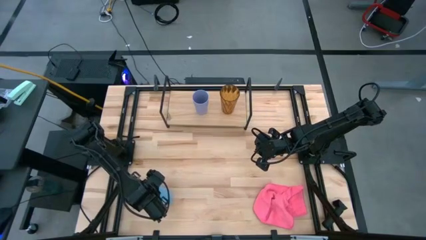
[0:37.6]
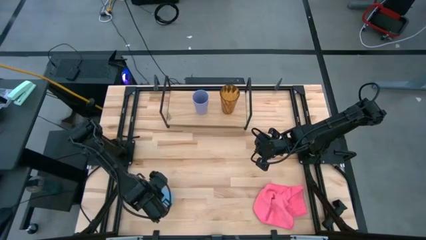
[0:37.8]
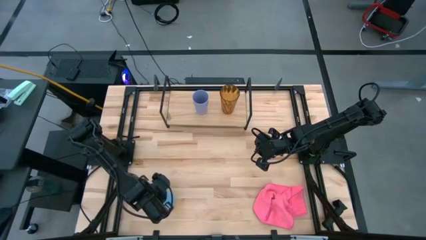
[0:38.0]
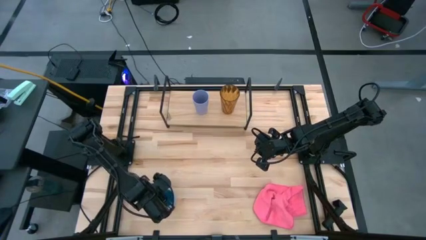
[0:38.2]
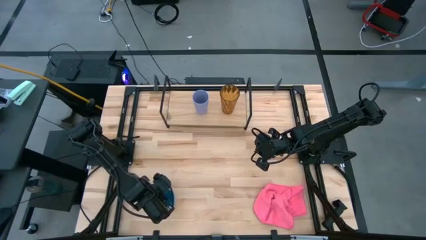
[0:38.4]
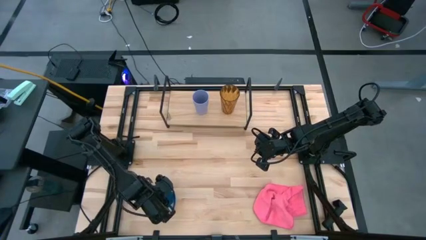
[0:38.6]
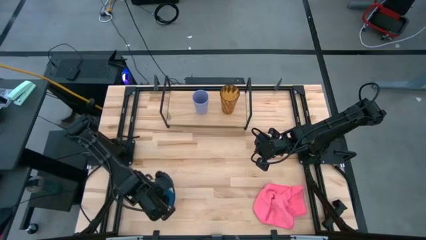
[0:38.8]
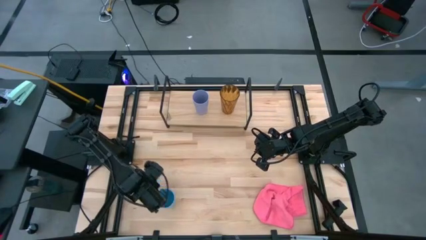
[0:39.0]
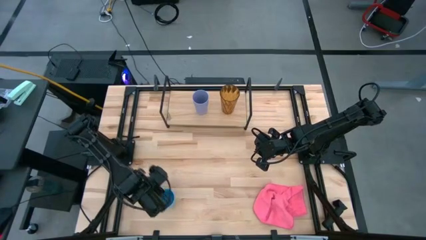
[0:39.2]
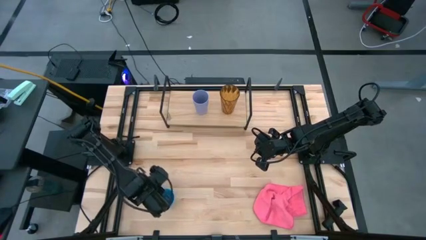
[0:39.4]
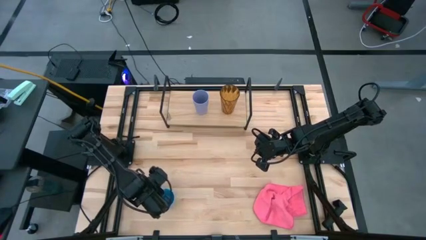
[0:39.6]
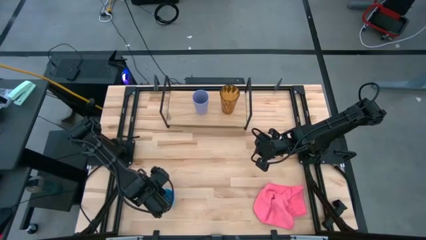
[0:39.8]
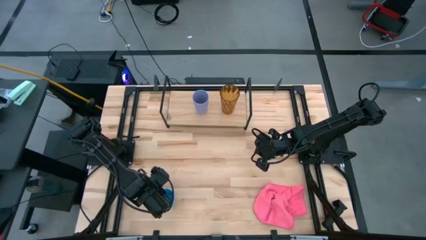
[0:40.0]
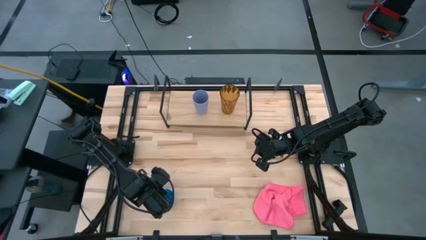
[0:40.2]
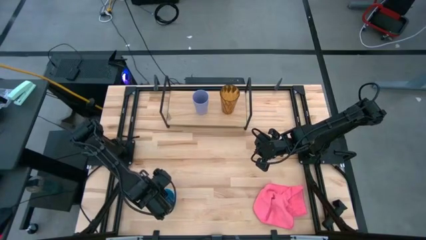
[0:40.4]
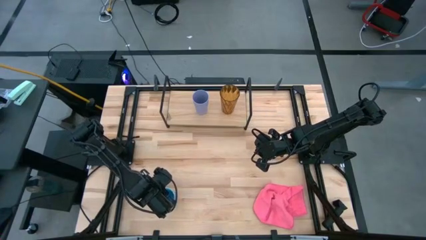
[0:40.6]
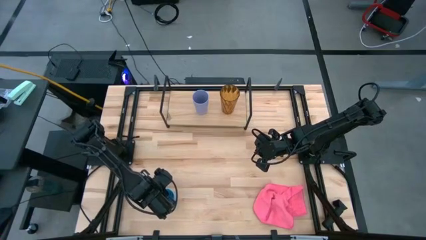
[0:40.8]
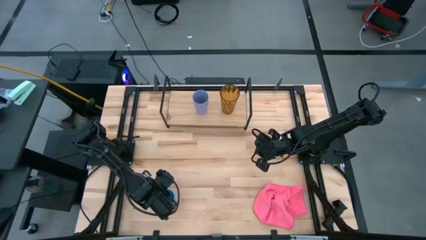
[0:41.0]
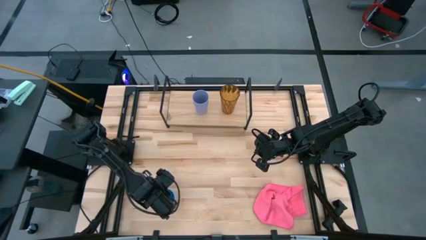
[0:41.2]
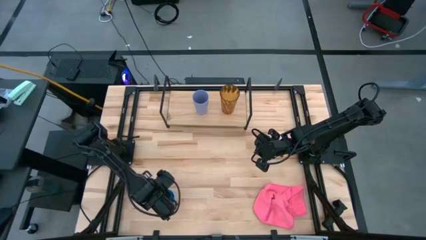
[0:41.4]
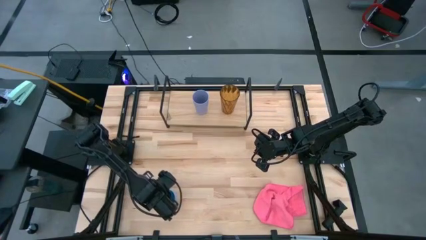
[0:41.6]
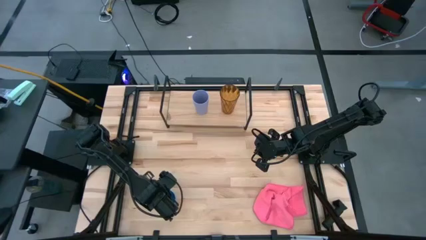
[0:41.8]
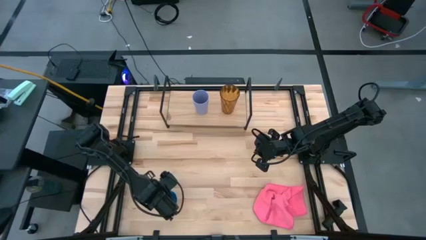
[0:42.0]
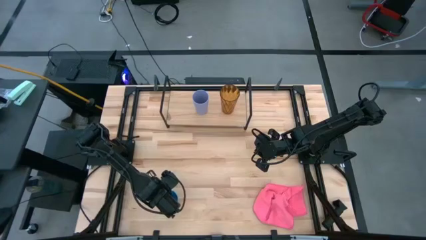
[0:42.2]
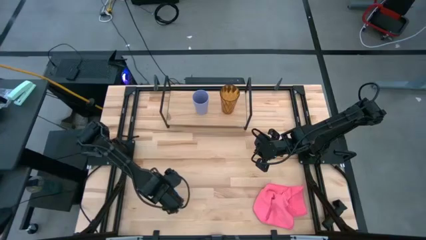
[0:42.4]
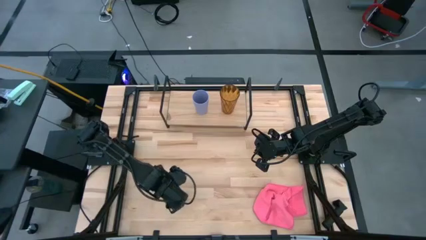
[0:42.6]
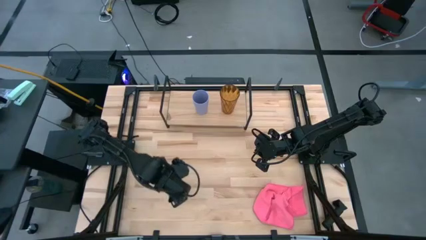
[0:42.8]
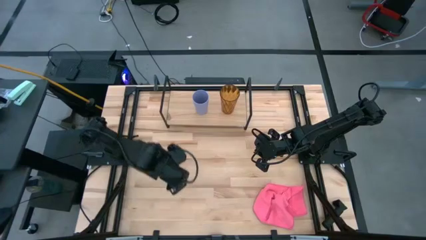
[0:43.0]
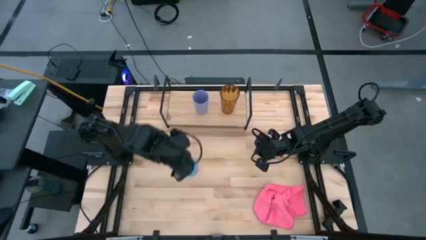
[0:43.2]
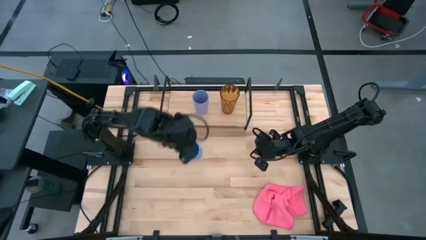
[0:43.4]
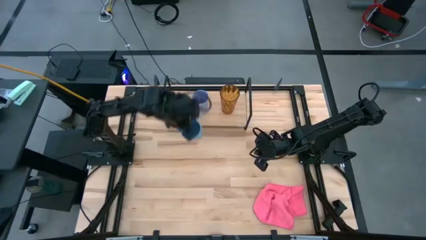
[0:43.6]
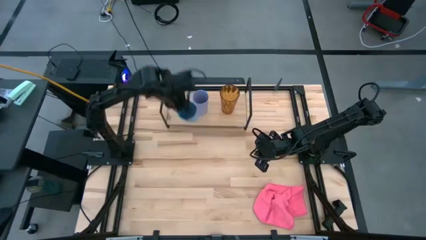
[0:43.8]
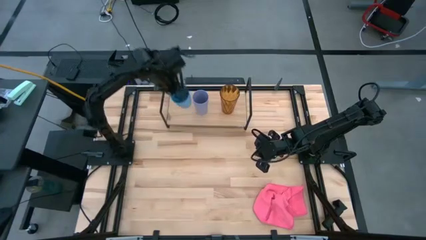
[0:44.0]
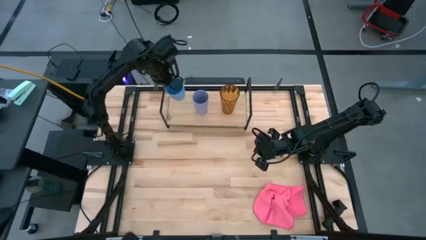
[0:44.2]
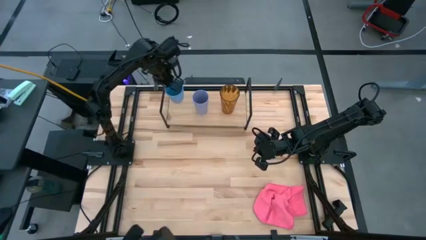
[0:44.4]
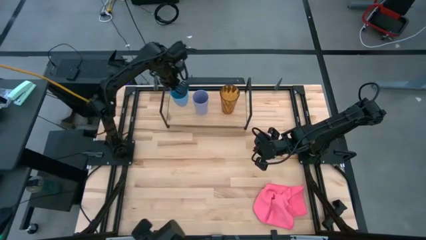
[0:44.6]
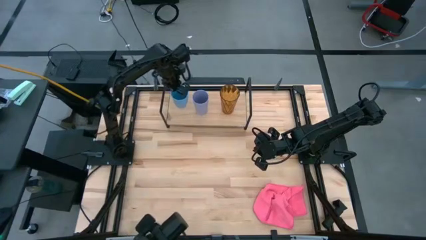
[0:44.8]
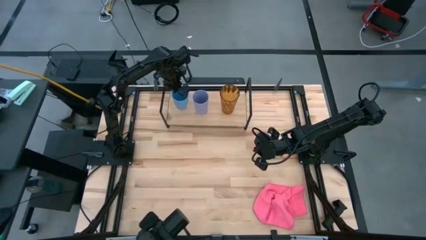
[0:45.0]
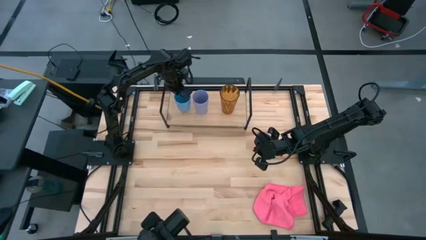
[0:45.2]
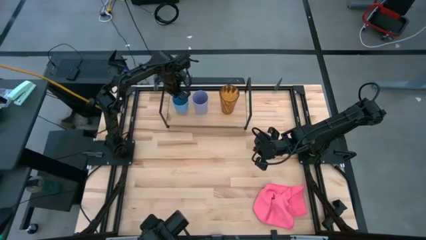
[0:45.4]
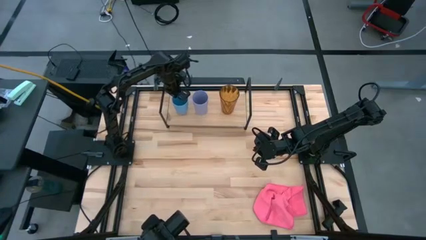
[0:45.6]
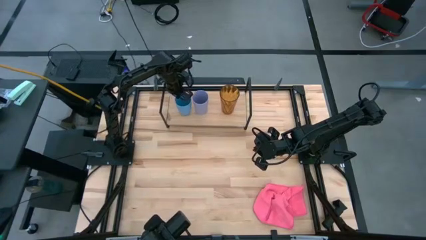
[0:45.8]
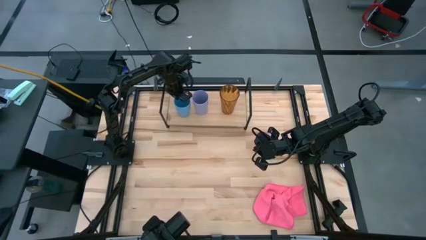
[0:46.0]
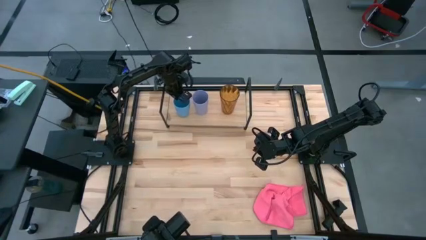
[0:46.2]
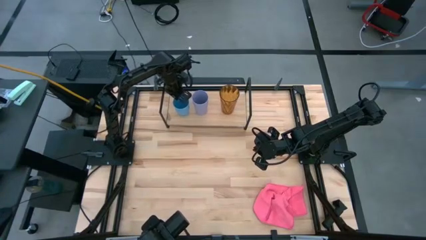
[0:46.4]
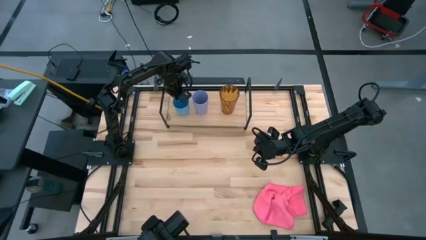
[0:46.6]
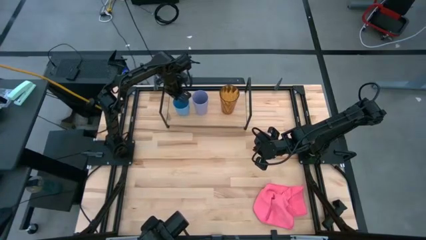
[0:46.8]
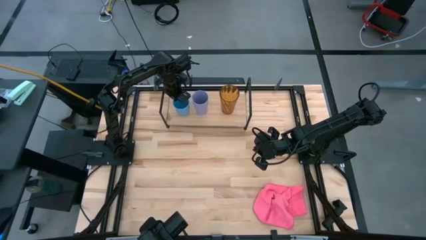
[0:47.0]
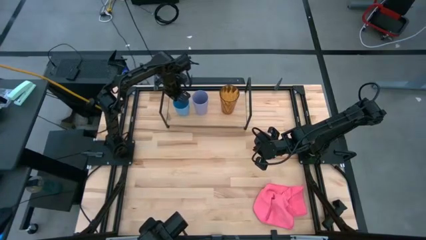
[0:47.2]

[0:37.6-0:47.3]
Task: Stack small to large cups/mugs on shelf
Put the blue cup on the shelf

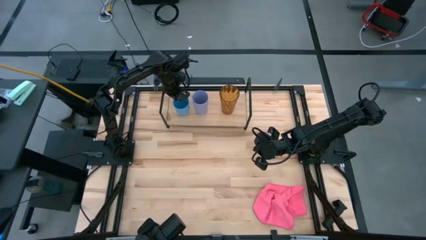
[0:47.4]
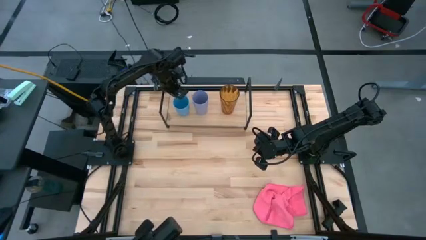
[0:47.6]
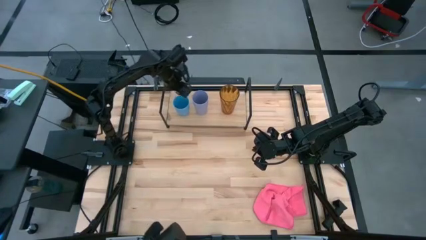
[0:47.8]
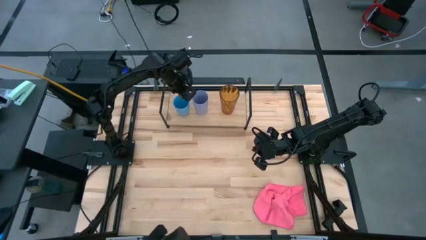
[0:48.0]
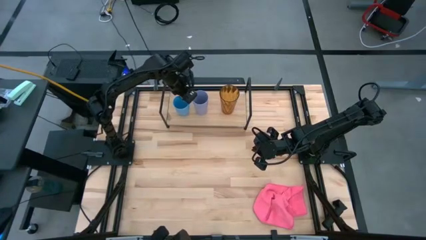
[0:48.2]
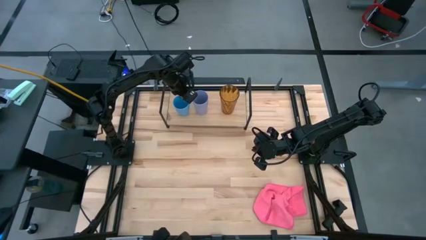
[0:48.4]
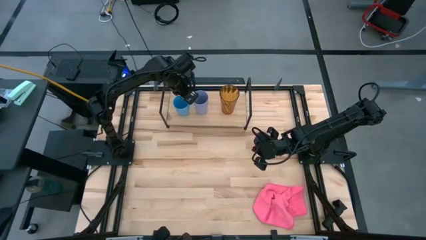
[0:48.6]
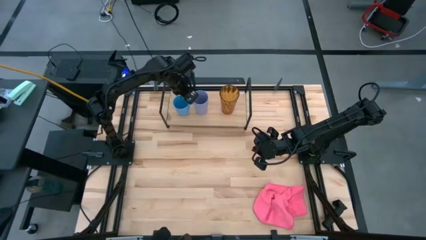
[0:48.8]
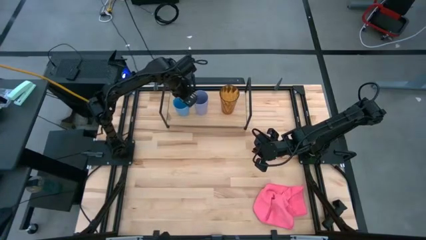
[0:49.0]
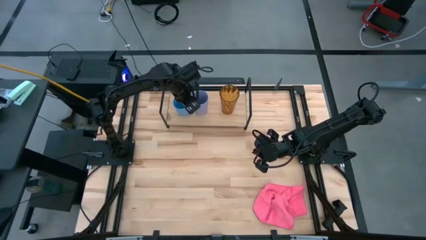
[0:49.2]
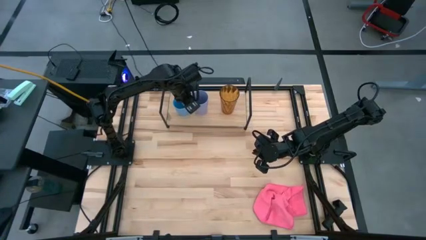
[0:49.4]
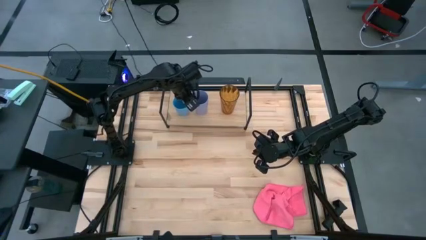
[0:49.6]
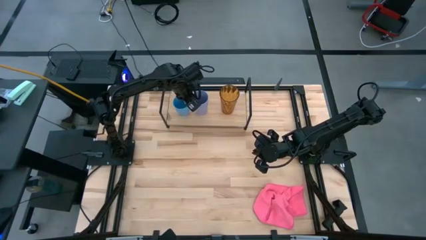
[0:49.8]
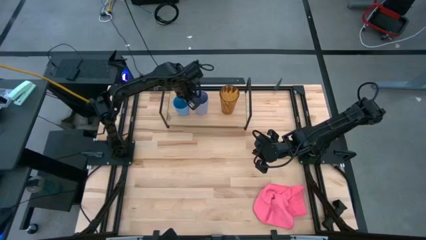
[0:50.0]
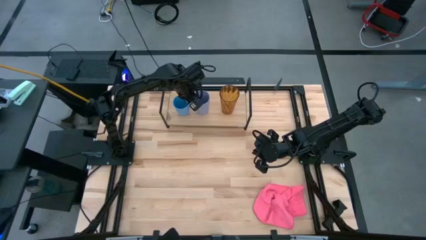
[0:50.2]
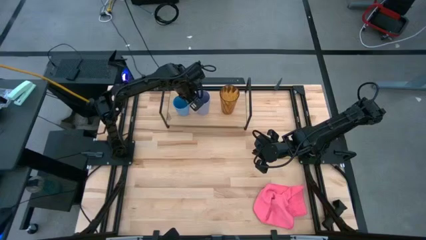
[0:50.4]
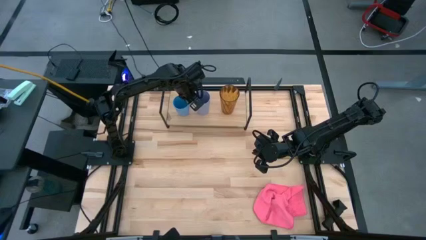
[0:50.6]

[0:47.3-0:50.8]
Adjust the purple cup

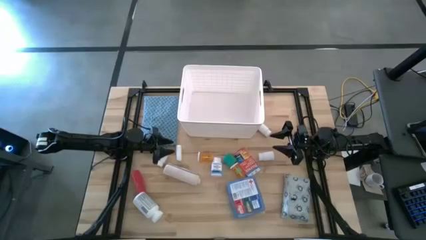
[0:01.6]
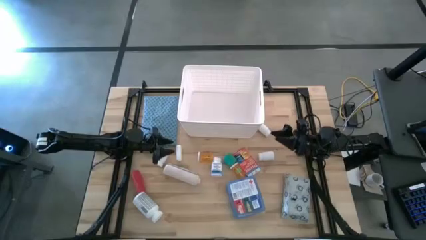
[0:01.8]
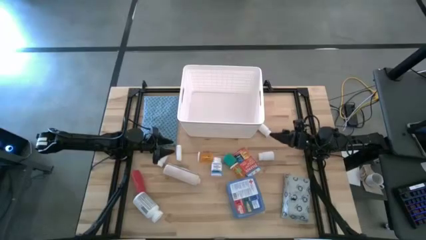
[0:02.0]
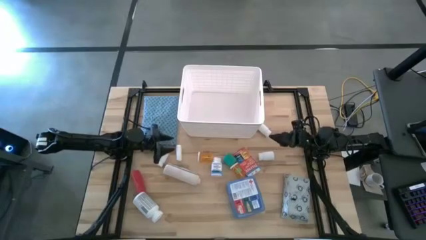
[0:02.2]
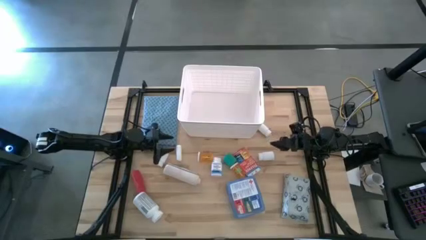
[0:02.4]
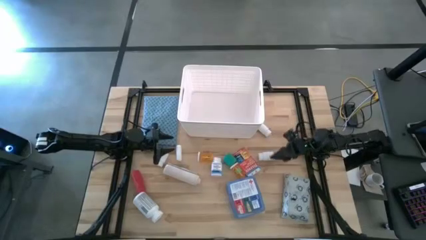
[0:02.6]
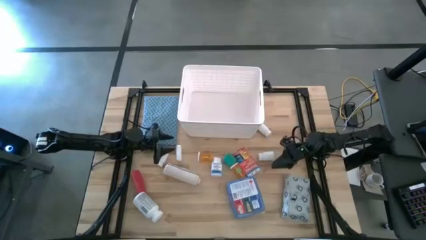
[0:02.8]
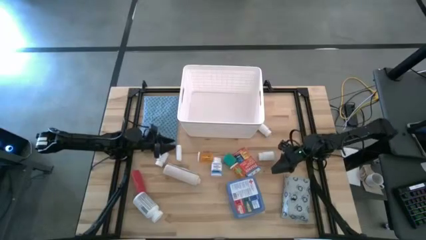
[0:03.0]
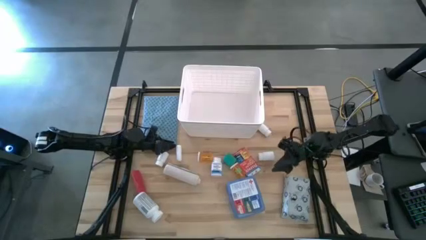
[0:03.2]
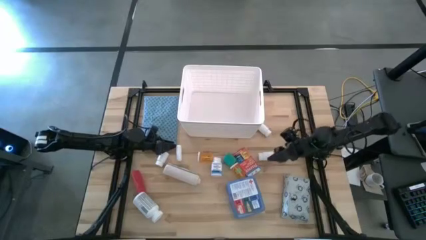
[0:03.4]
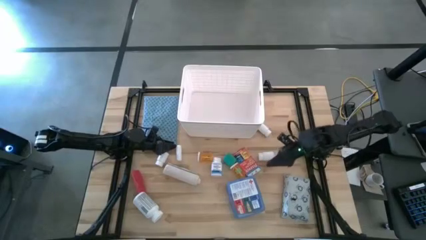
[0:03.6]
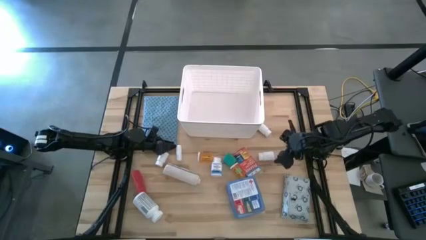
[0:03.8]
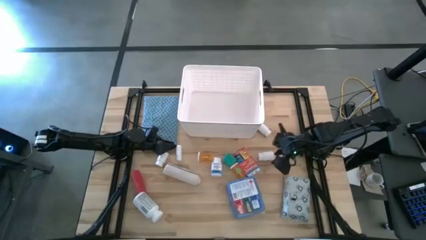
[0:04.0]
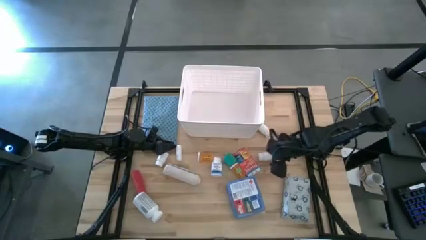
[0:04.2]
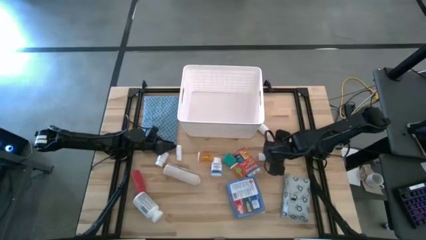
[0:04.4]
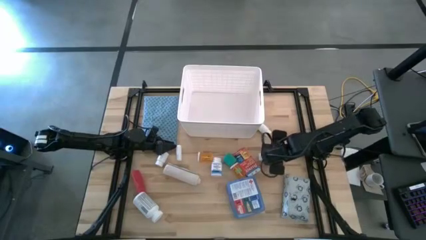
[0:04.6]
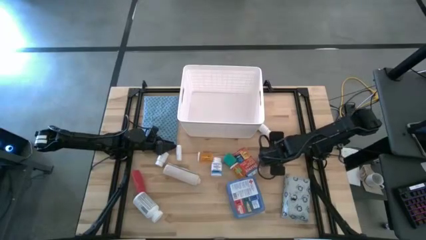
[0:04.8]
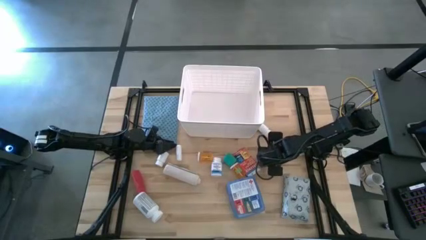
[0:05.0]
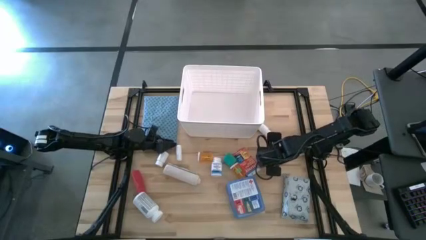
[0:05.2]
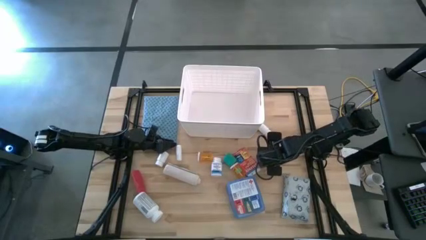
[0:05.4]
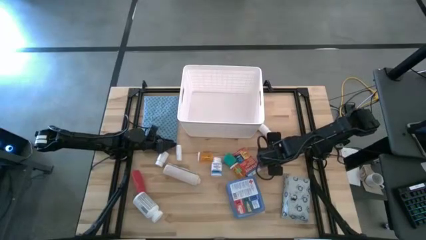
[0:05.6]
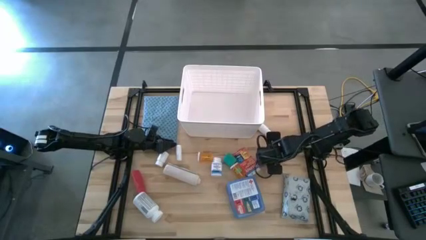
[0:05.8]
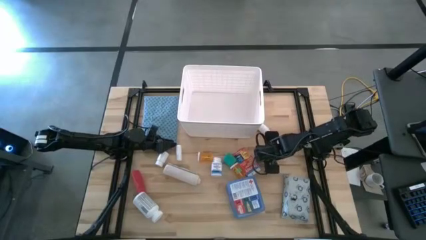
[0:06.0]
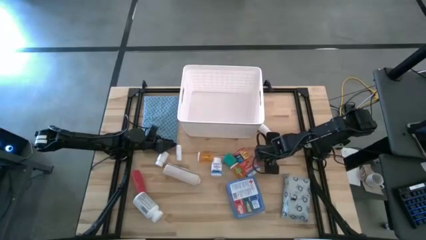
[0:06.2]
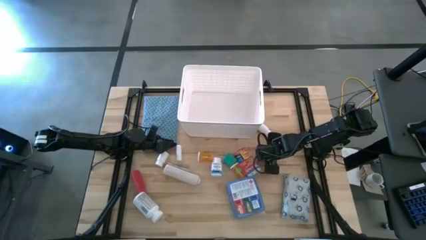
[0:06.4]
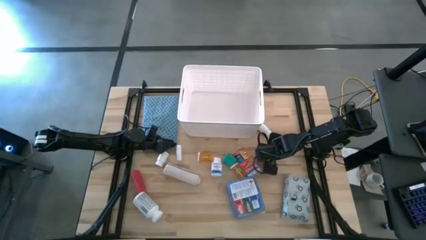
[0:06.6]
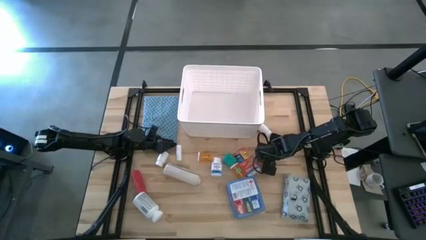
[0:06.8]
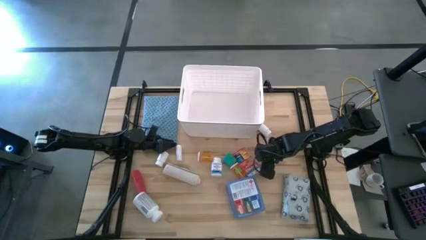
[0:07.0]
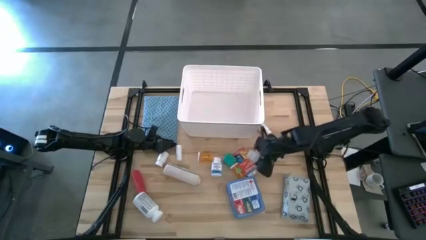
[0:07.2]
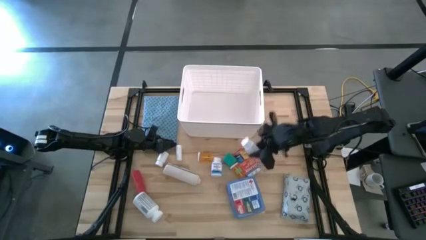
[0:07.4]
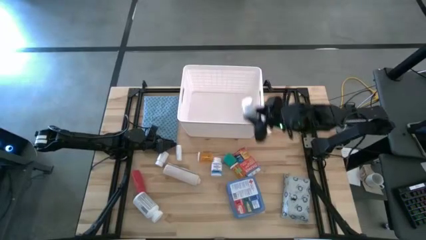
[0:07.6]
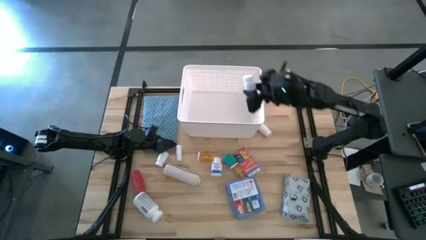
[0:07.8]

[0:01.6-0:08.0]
Task: Pick & place medical supplies in basket/bin
Put the bottom right white medicine bottle into the white bin
